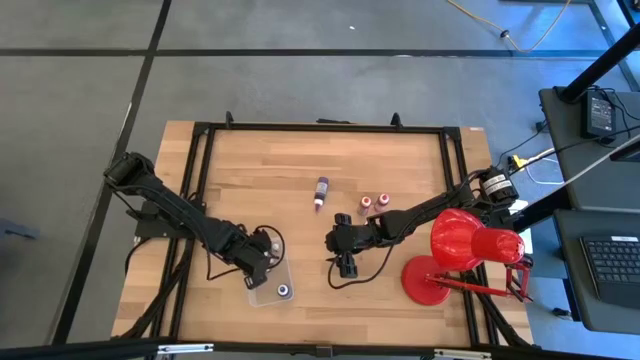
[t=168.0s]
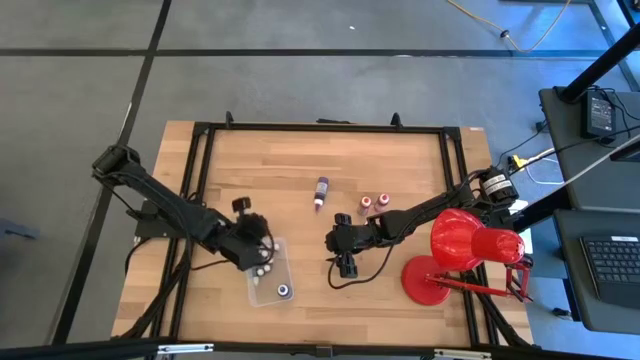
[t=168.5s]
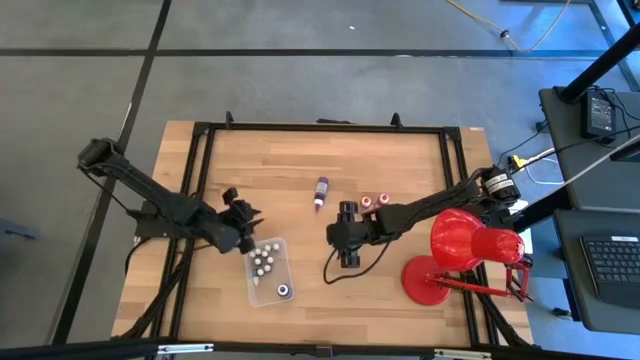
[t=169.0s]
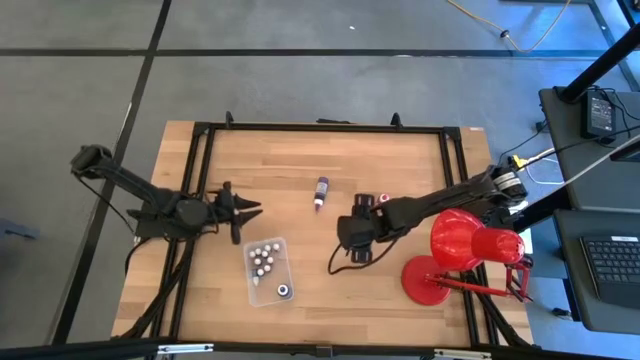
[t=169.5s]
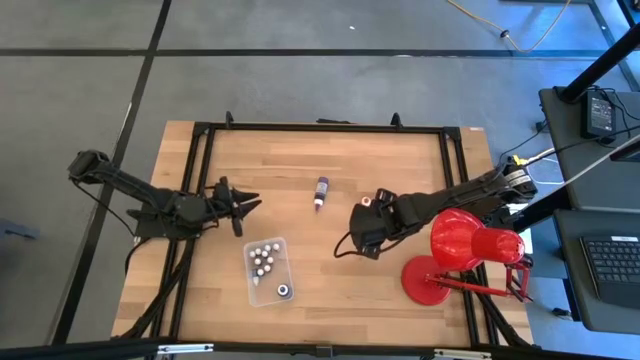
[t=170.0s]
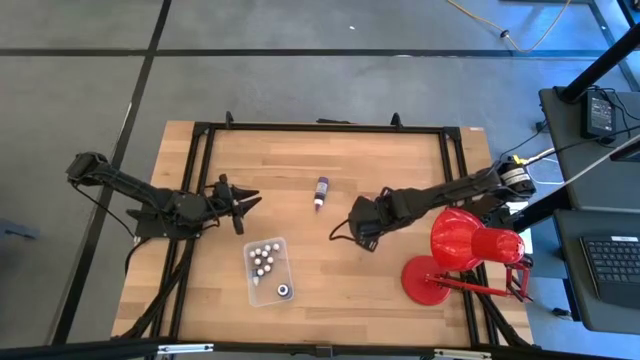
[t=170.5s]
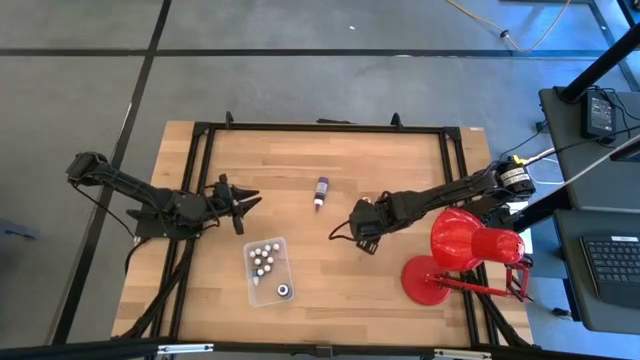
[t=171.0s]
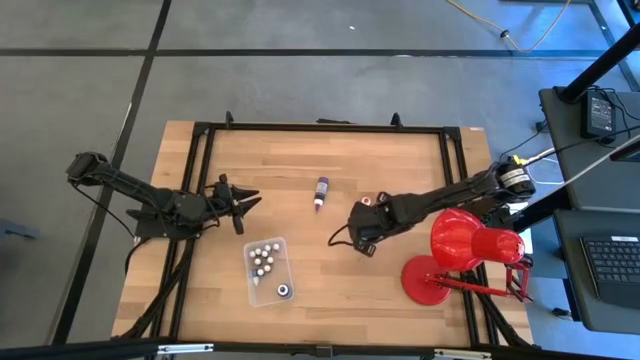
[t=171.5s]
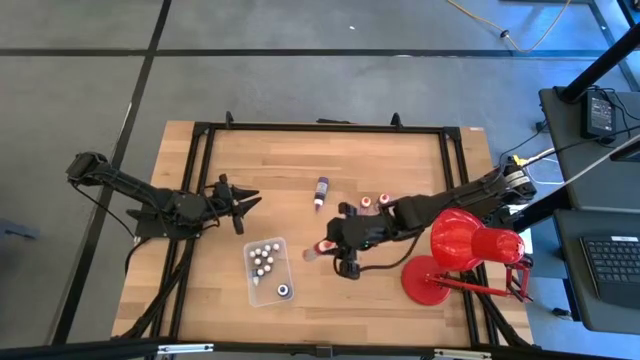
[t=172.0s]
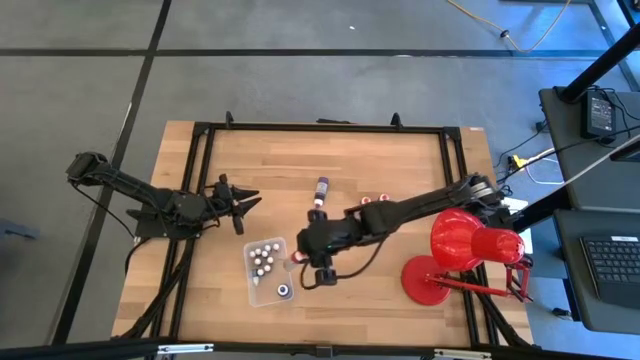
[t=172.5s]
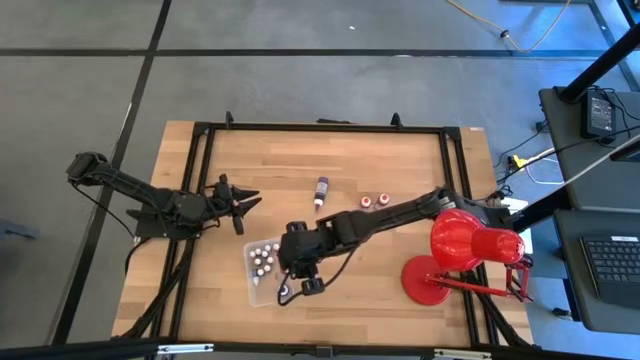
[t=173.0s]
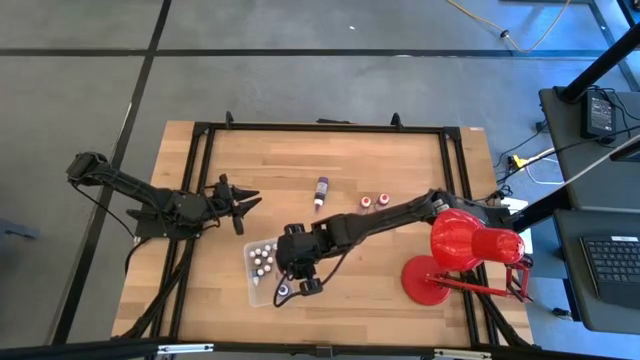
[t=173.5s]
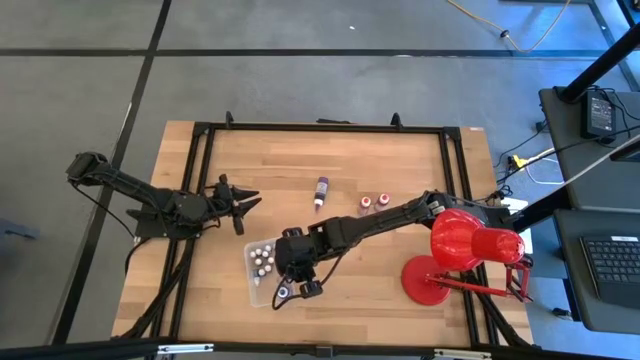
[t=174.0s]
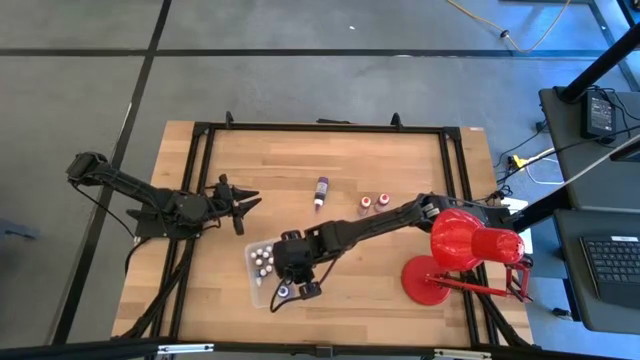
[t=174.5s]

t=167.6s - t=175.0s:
Task: Pick & Place food coloring
Put the large orange food coloring bottle into the bin

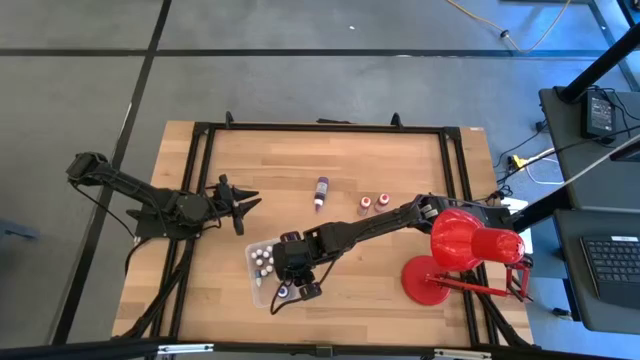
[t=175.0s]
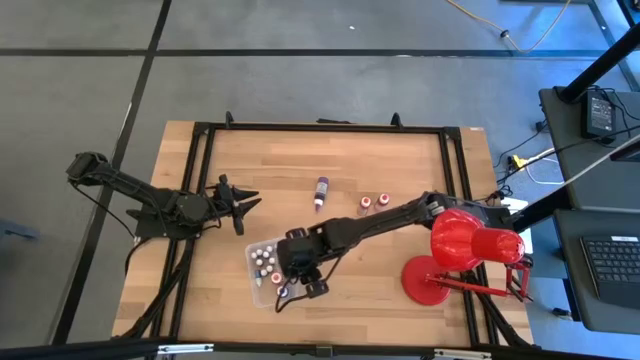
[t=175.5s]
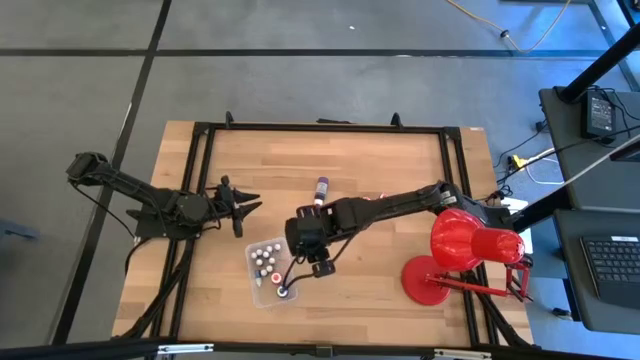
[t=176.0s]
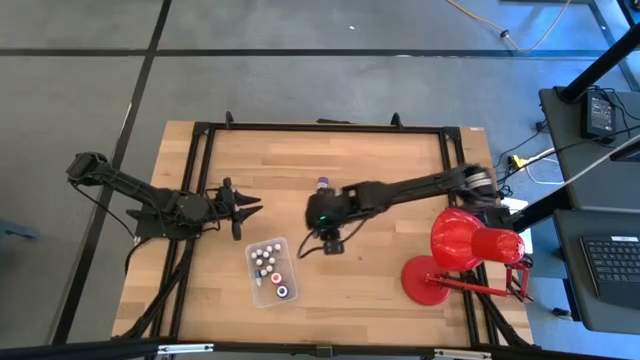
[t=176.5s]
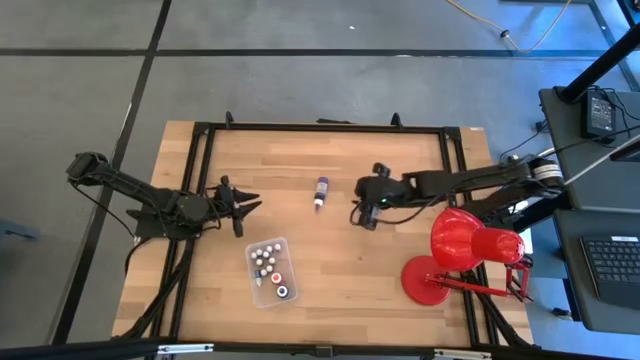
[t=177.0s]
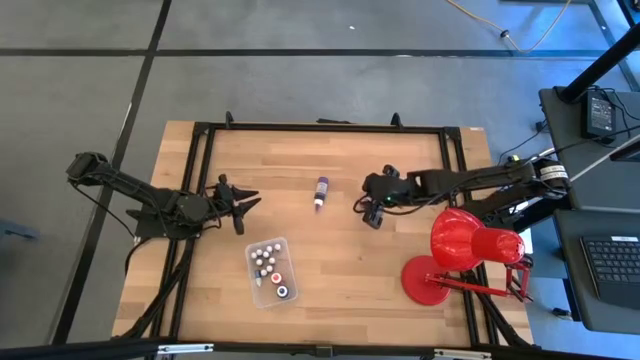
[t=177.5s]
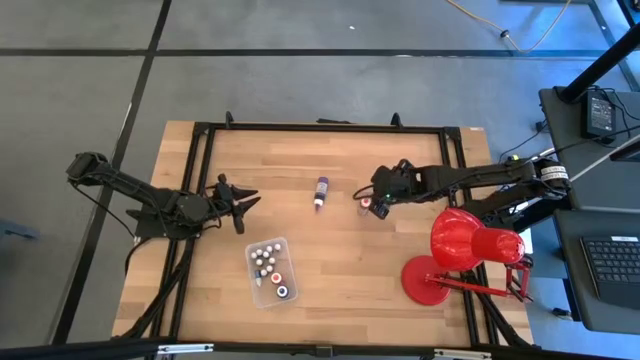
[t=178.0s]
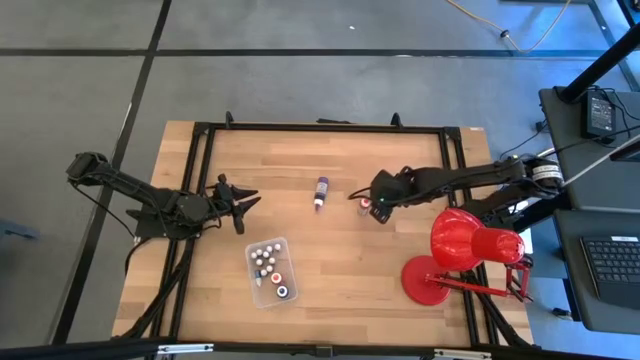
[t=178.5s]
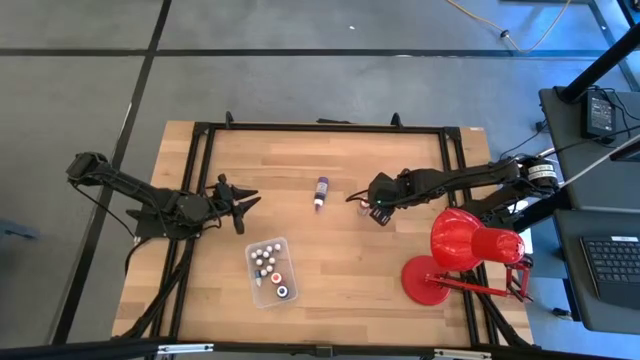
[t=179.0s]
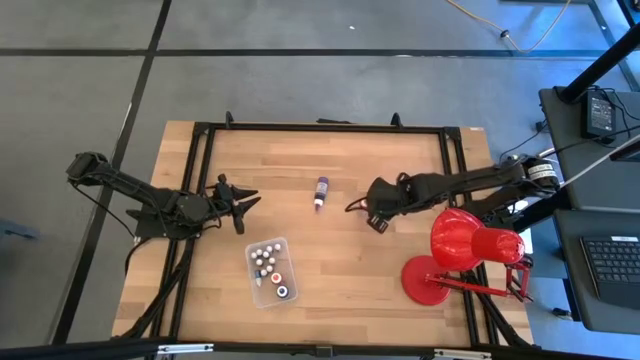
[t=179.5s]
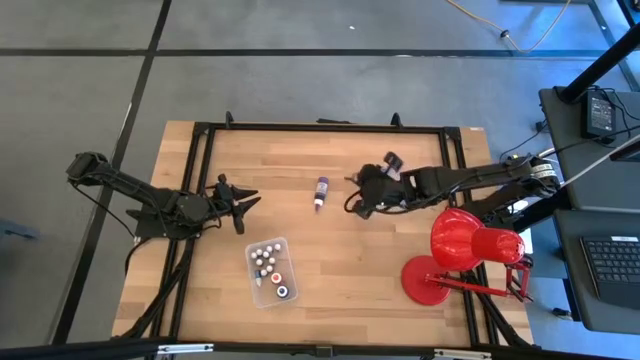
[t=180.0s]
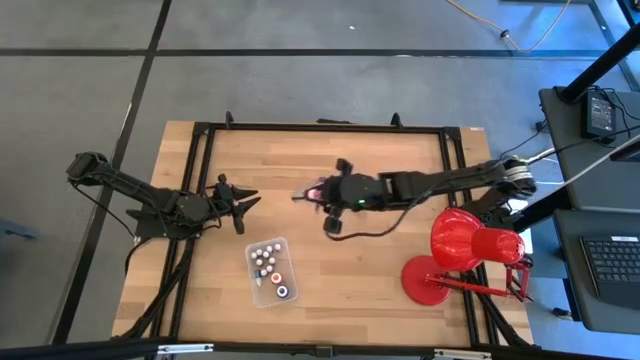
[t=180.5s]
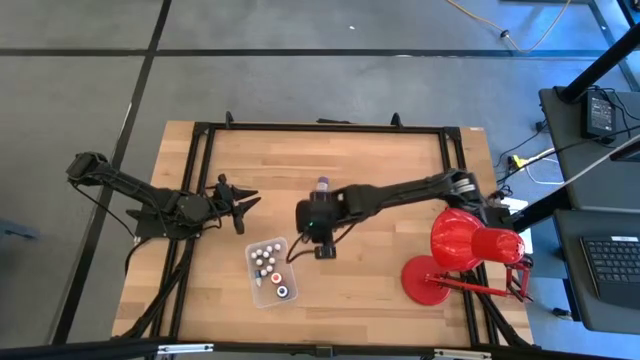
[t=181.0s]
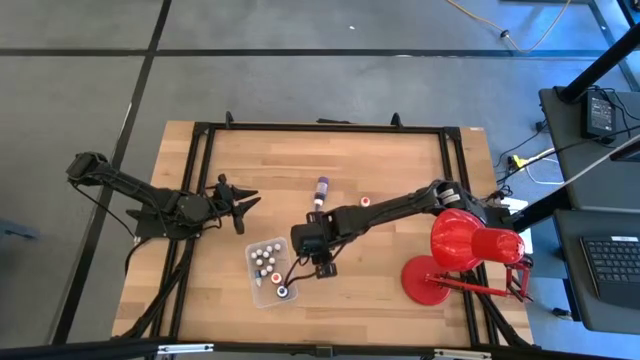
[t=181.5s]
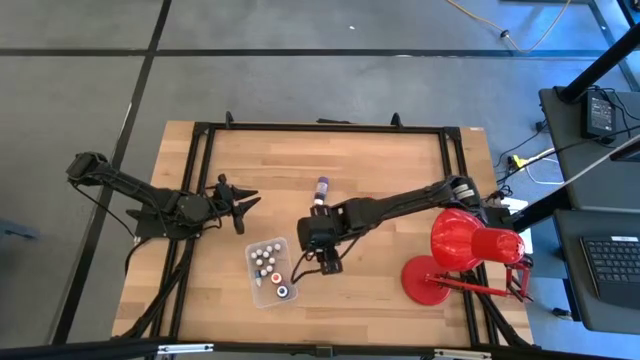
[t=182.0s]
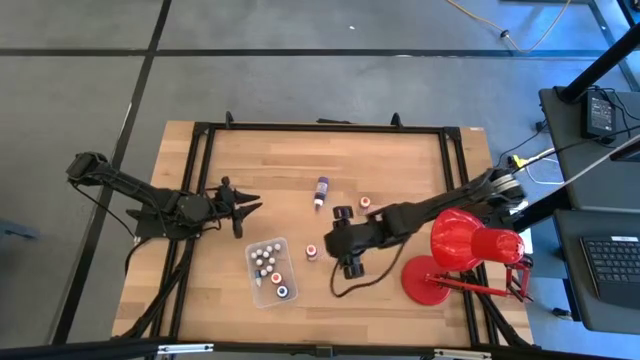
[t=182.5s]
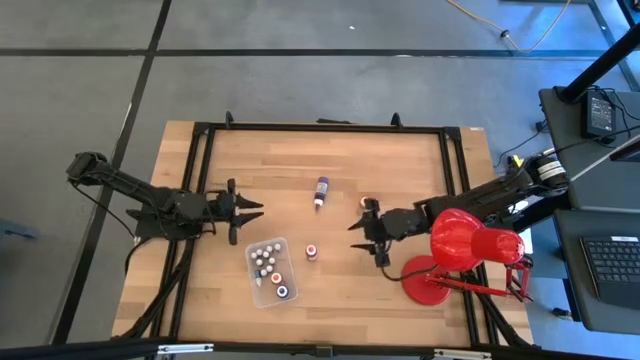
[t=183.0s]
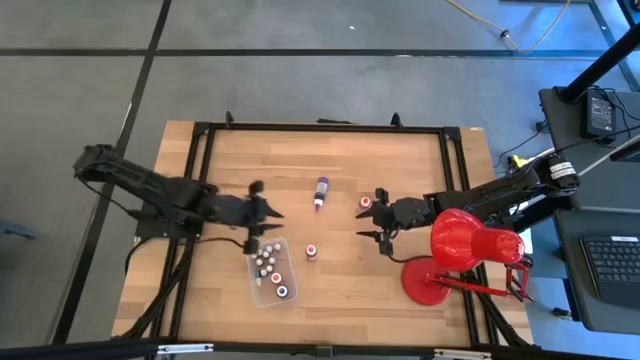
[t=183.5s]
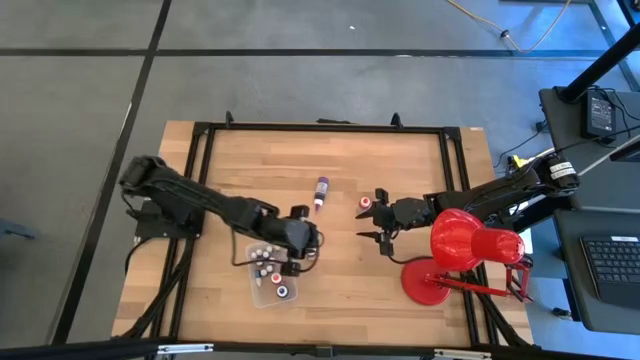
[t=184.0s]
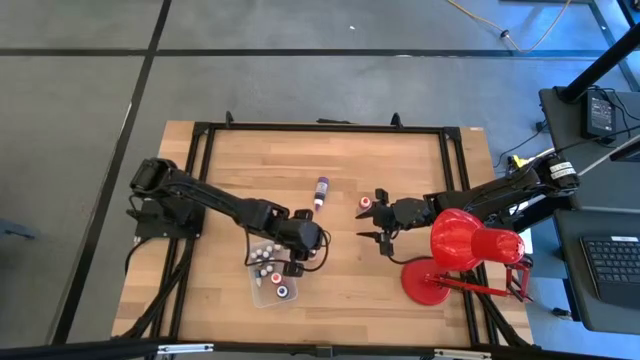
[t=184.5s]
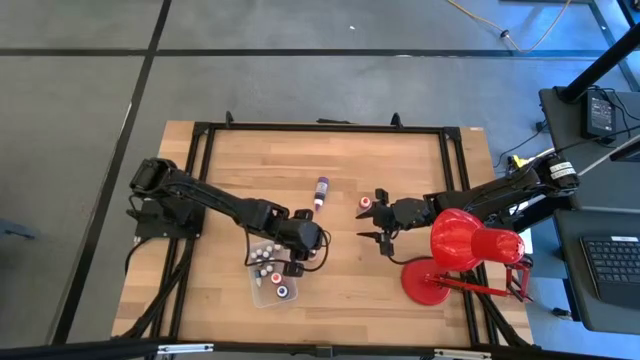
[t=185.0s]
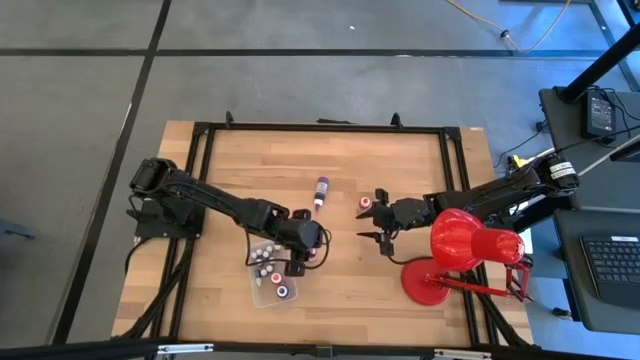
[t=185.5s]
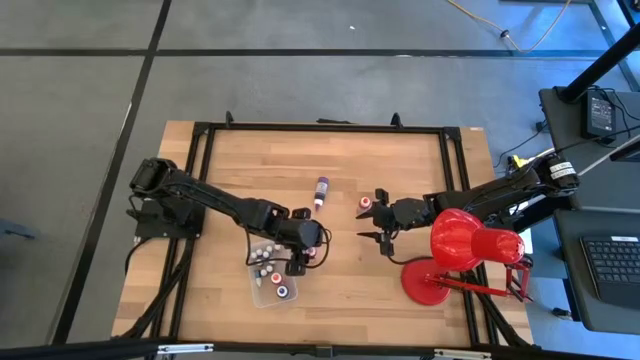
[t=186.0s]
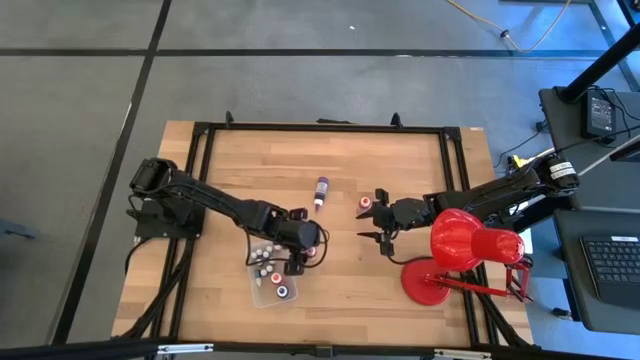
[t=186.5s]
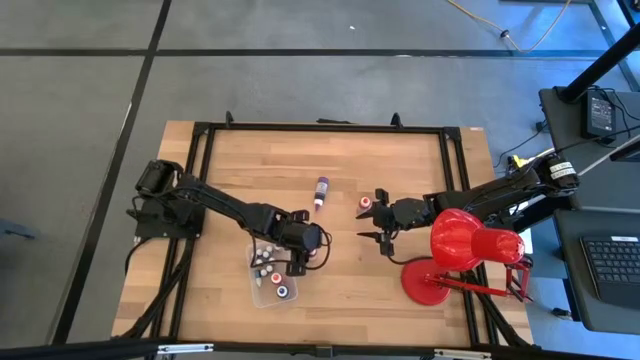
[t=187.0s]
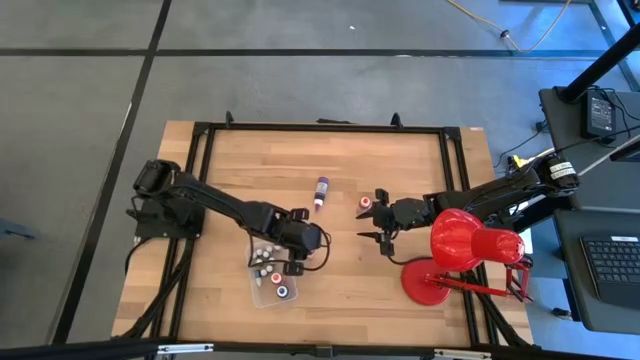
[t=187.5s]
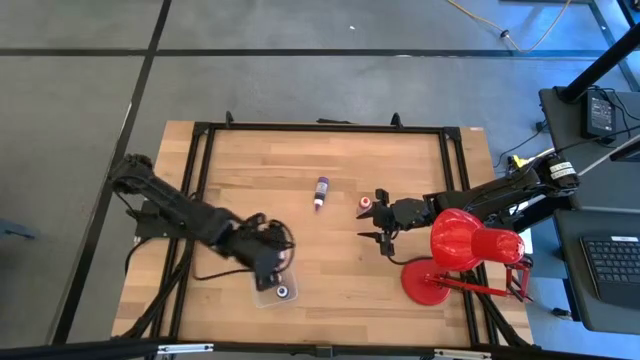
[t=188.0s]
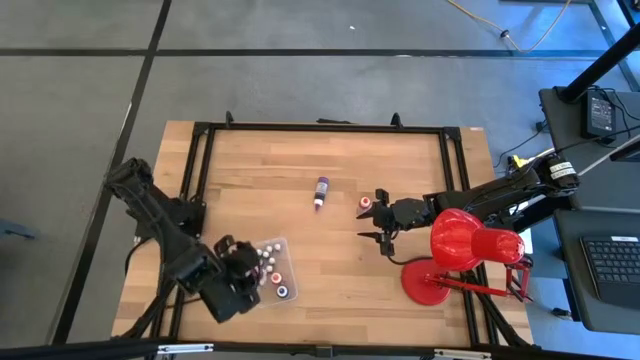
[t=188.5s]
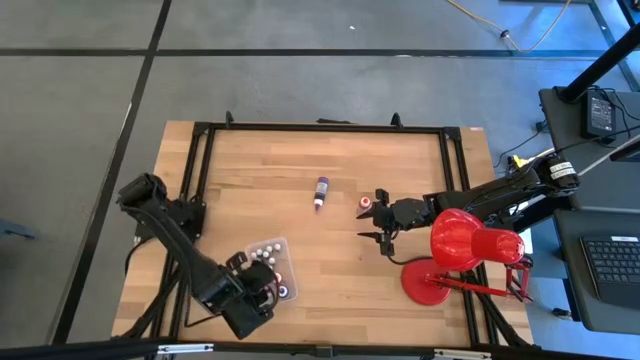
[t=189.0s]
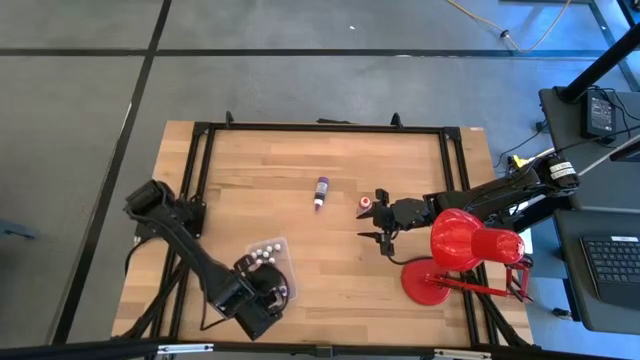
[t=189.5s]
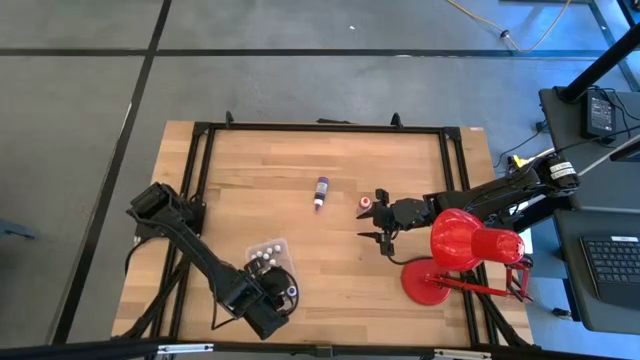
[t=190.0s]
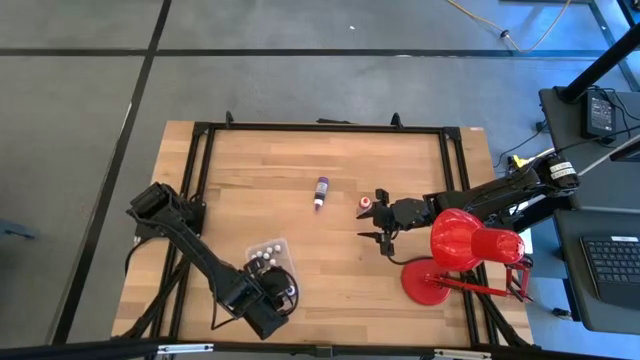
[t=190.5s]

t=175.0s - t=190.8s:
Put the large pink food coloring bottle into the bin
